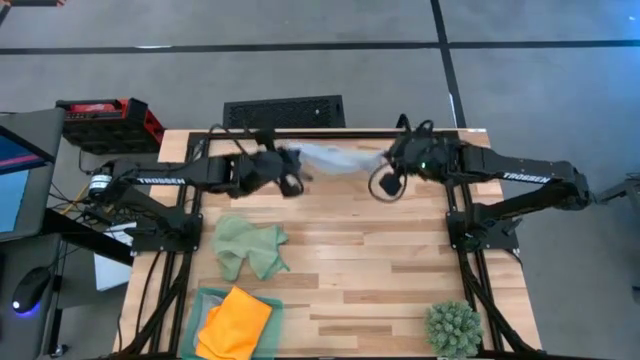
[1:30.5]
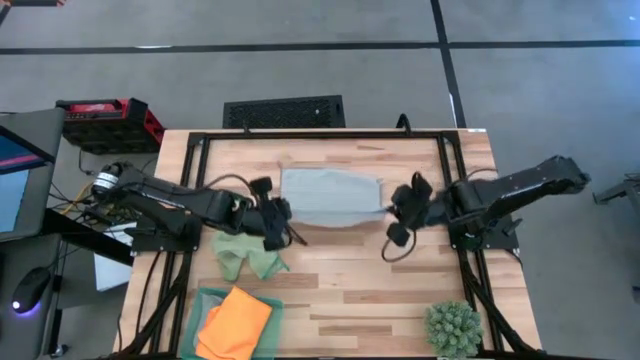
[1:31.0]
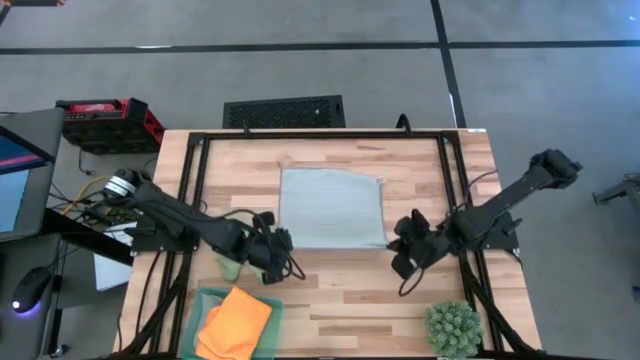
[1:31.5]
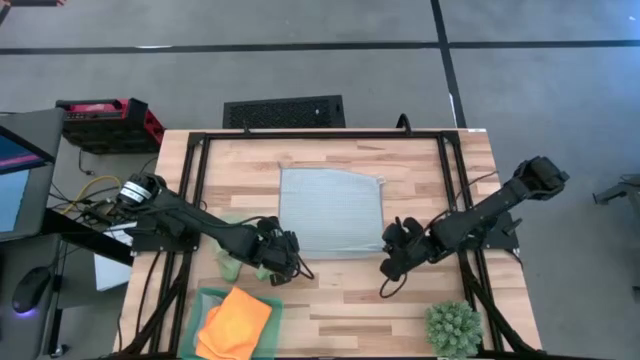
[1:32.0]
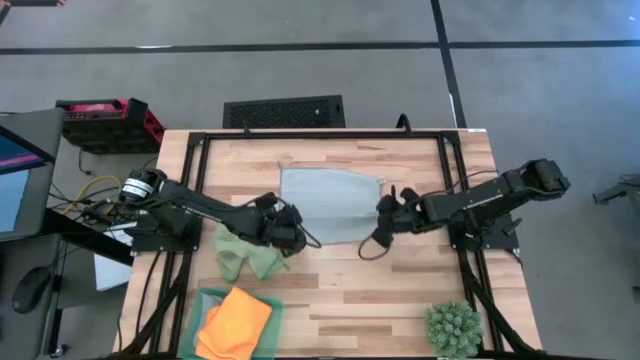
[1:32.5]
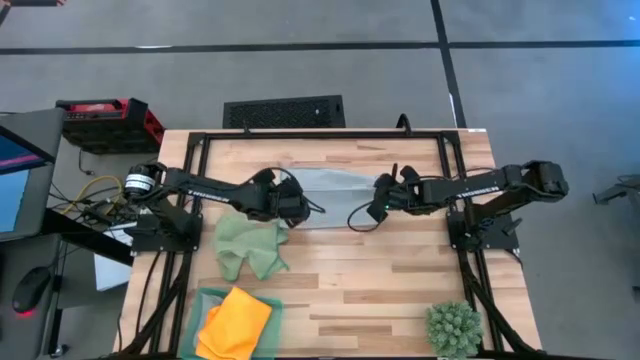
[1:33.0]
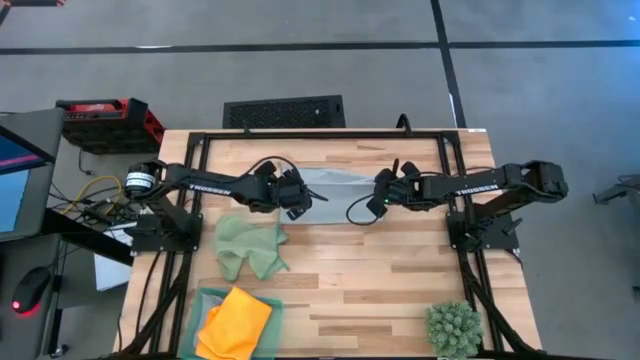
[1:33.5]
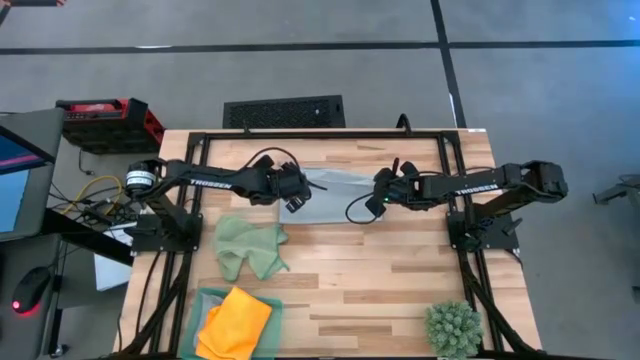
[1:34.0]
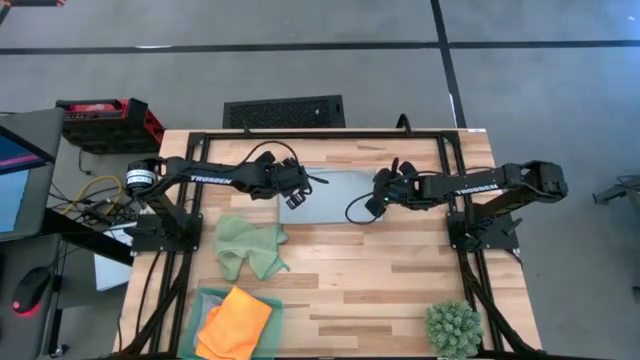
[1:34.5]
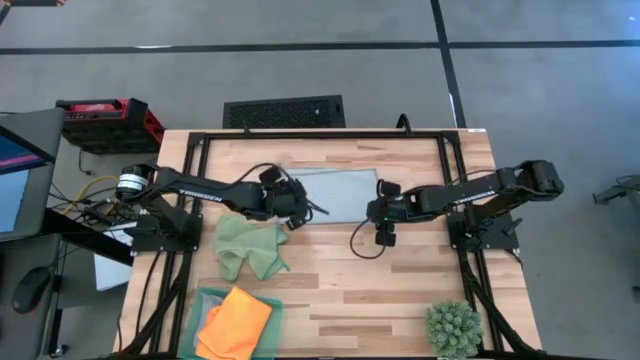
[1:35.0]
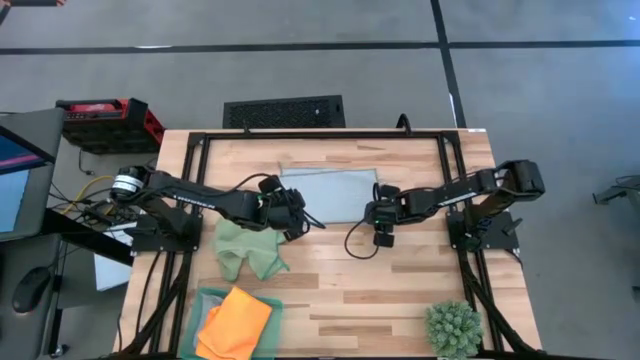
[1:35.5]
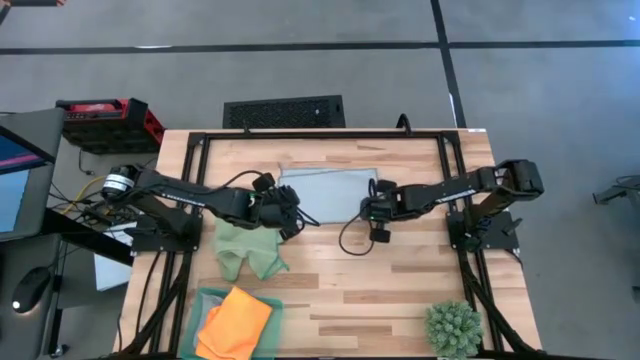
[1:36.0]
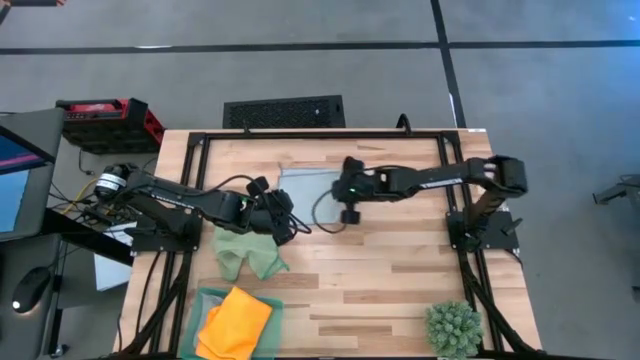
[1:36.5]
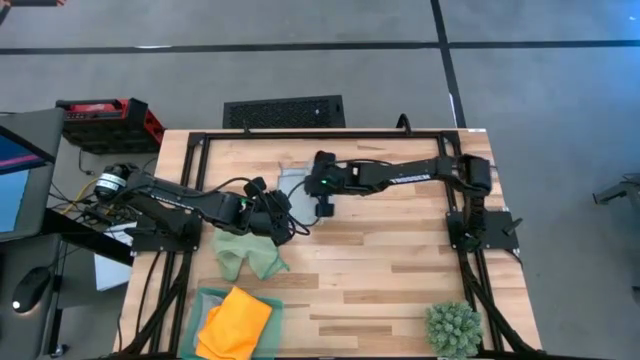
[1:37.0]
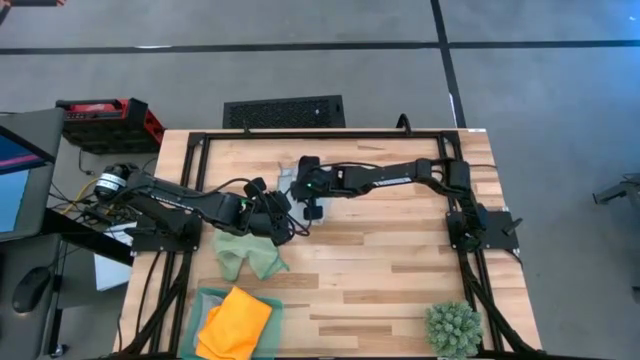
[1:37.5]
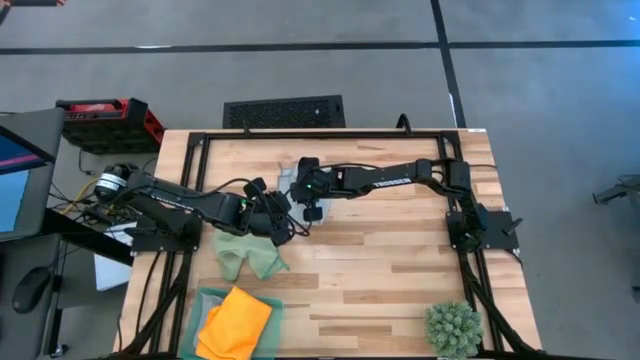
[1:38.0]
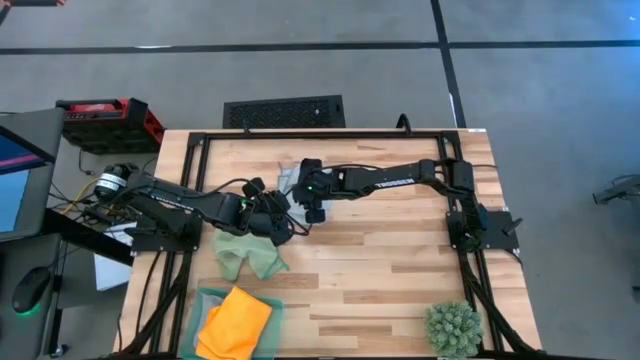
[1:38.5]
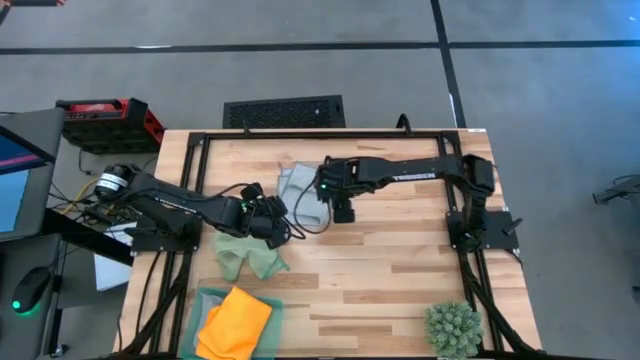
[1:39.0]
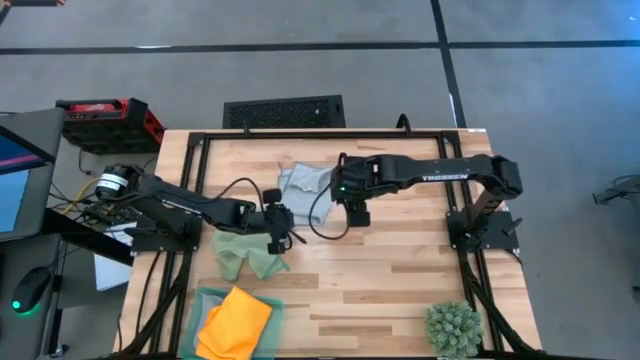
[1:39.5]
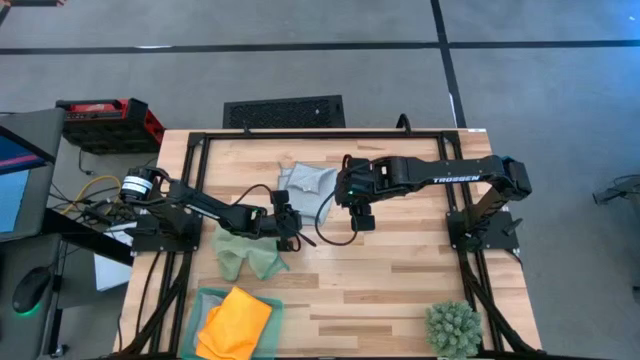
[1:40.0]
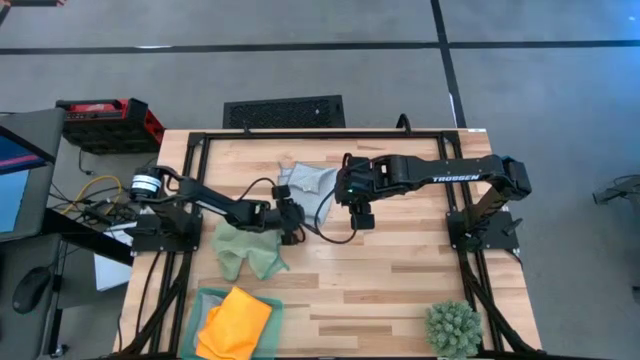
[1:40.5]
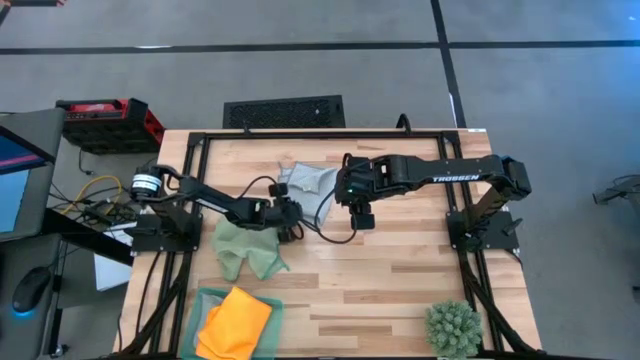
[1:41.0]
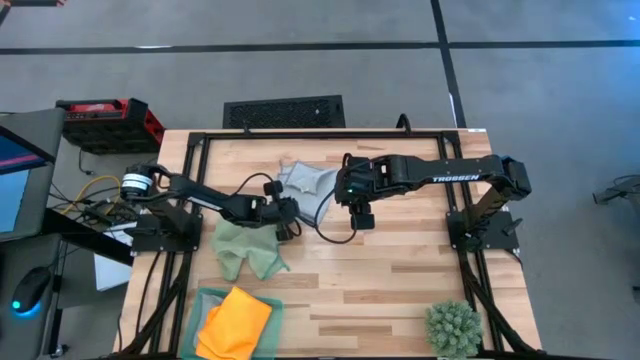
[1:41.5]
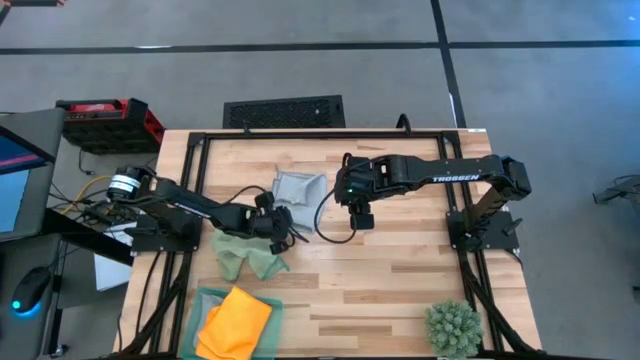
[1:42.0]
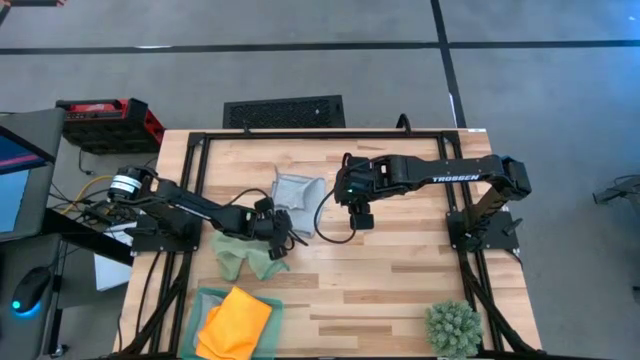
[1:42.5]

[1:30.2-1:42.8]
Task: Fold microfiber towels
Fold the gray microfiber cloth

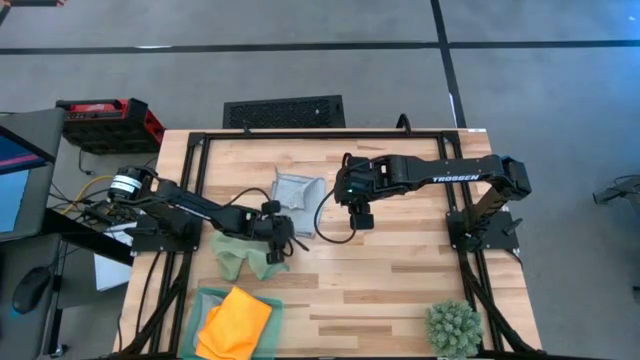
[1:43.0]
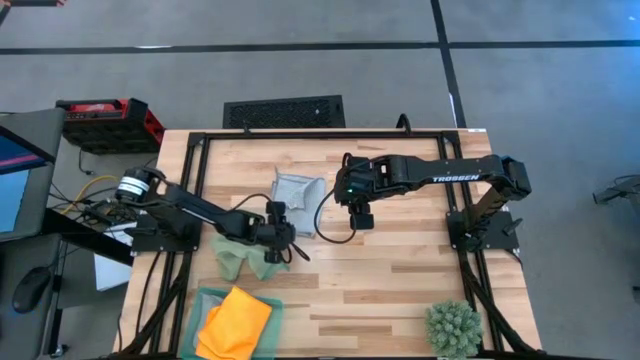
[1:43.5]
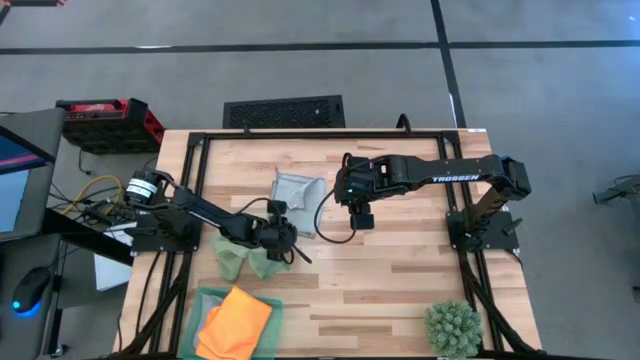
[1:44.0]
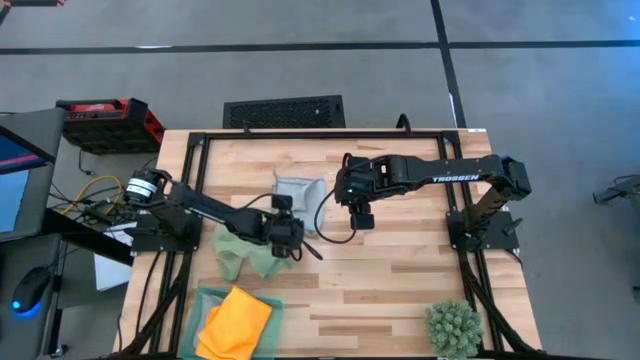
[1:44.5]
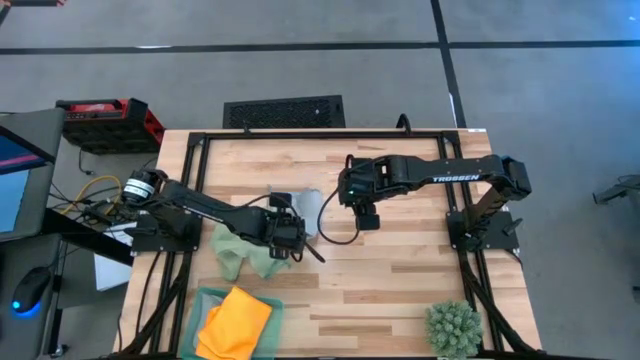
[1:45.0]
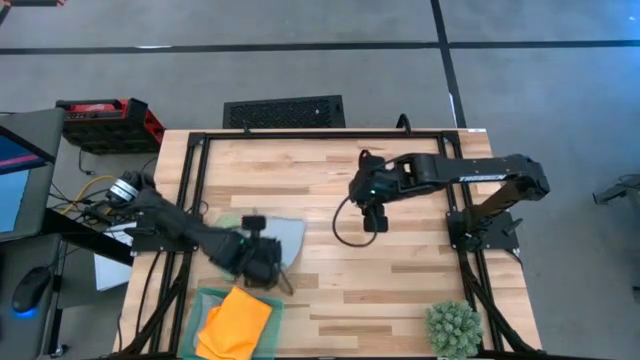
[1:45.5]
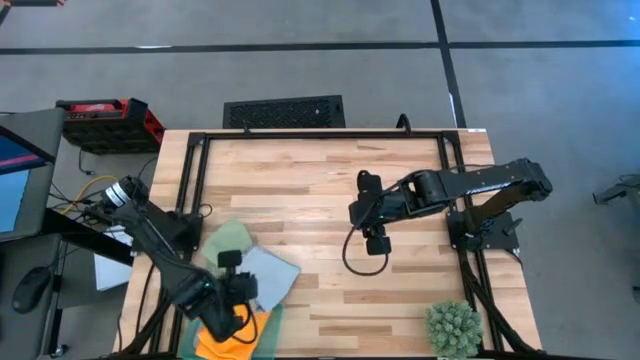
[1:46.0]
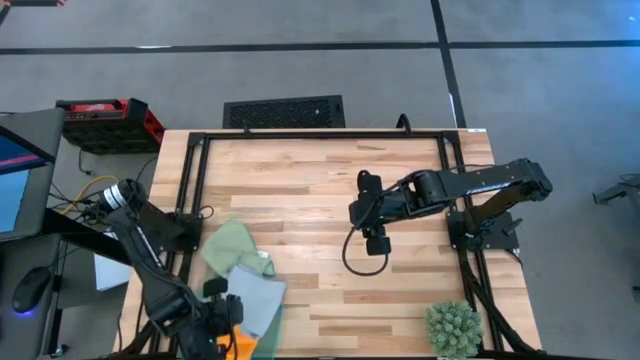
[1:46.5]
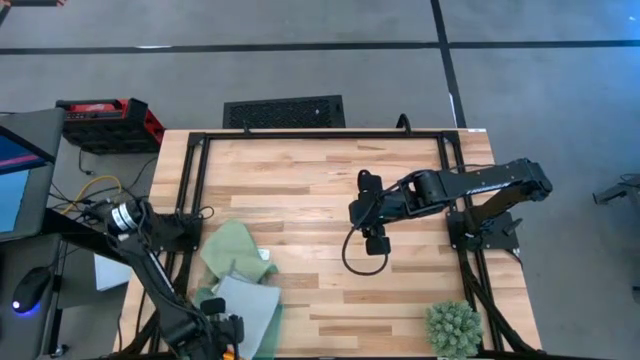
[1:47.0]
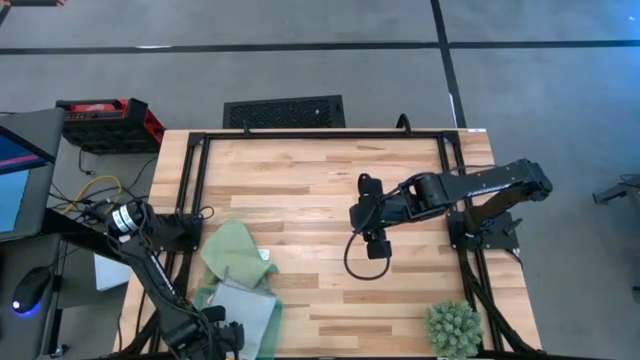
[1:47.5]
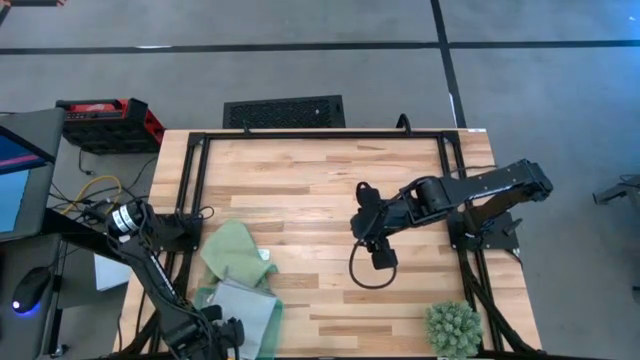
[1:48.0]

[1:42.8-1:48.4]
Put the gray microfiber cloth into the green bin

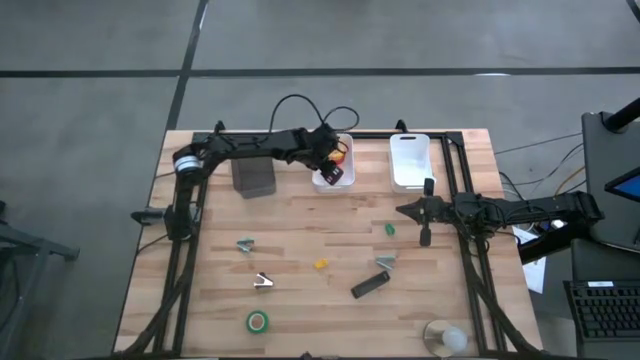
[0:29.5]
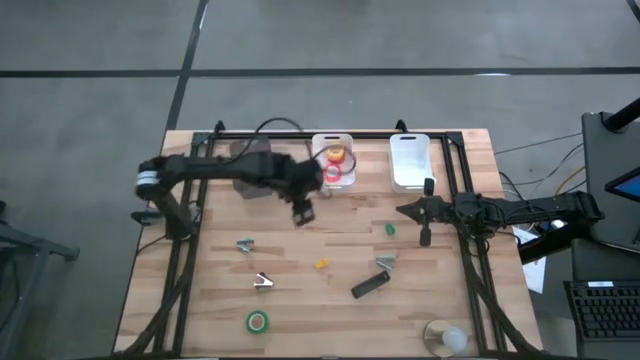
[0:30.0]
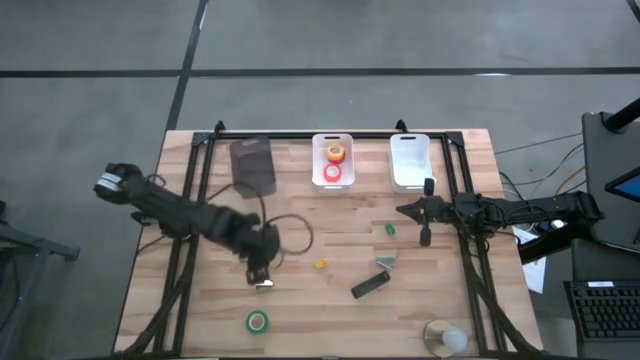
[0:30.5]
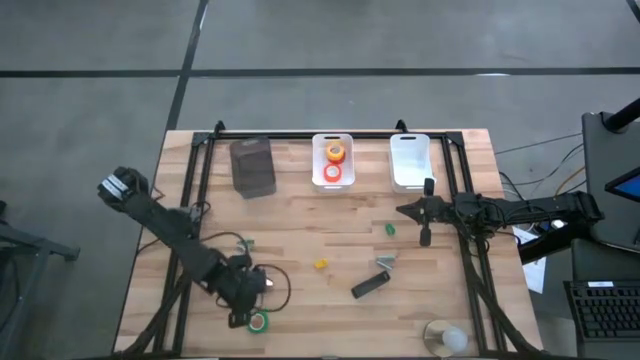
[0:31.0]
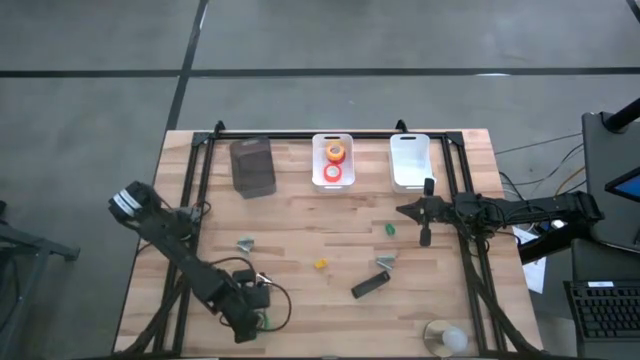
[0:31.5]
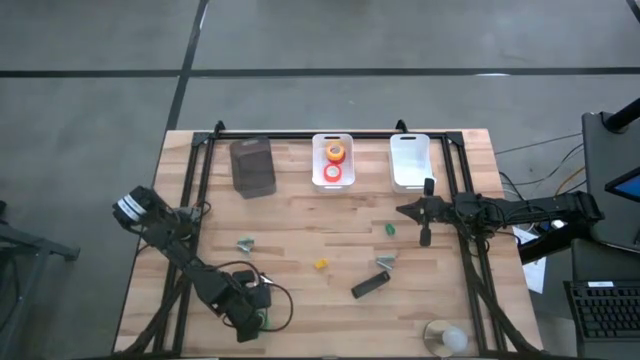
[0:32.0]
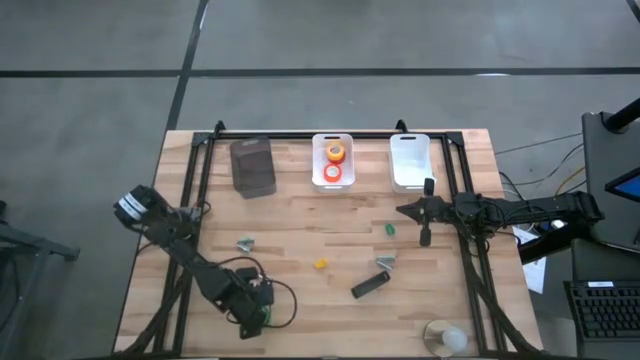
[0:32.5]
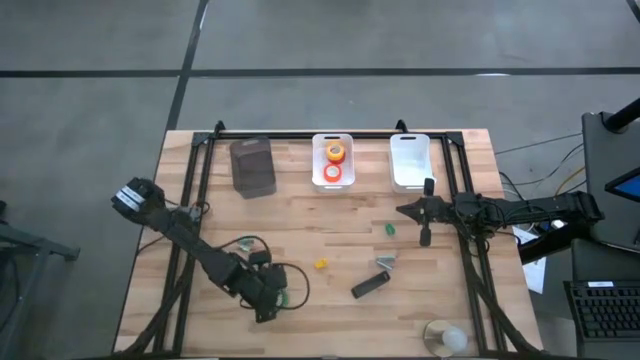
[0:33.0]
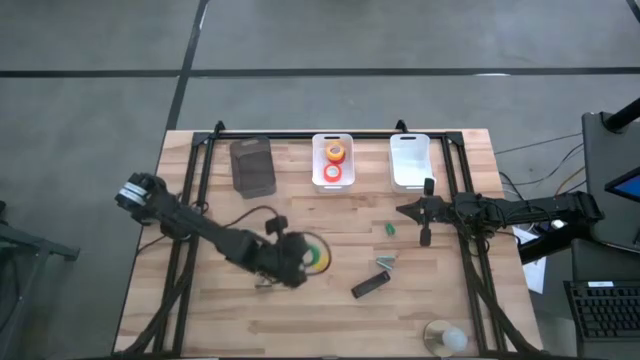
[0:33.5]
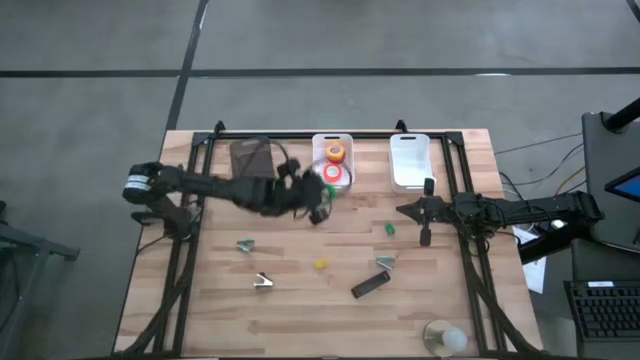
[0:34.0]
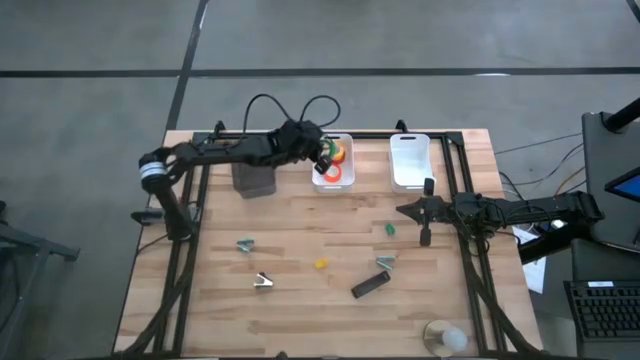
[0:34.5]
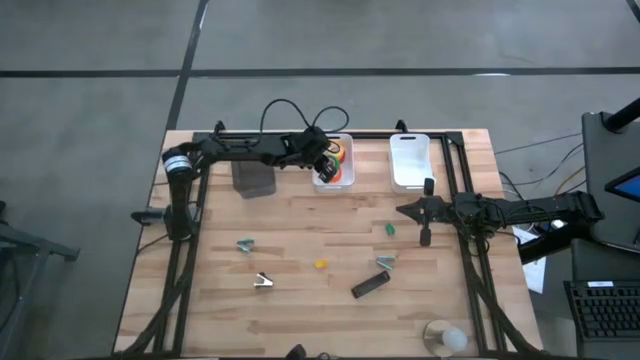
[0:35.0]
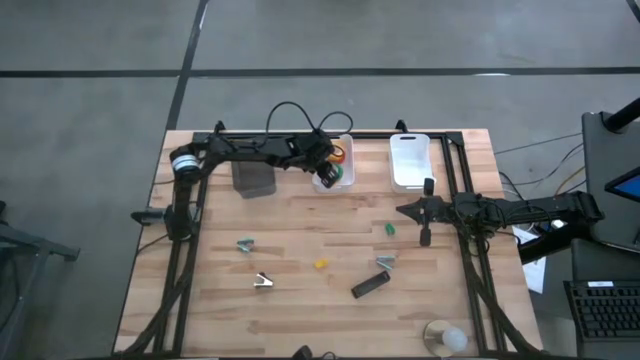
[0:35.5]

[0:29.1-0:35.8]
Task: Pick and place Stapler, Stapler remover, tape
Put the green tape into the left white bin
